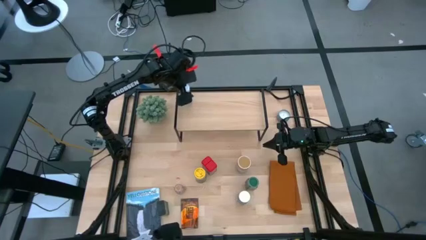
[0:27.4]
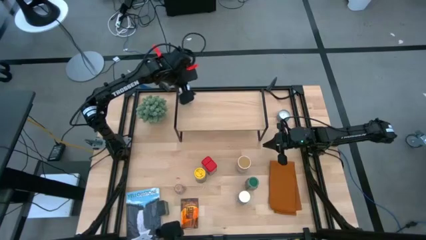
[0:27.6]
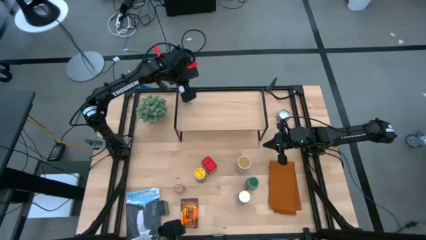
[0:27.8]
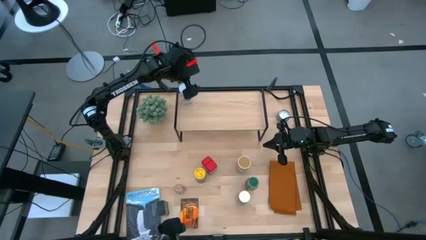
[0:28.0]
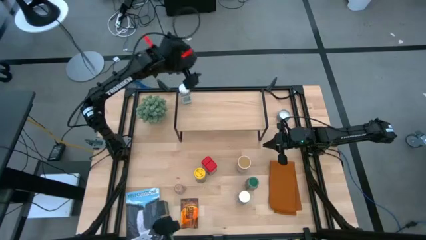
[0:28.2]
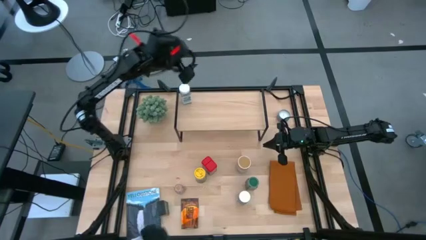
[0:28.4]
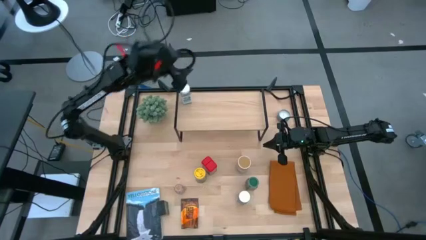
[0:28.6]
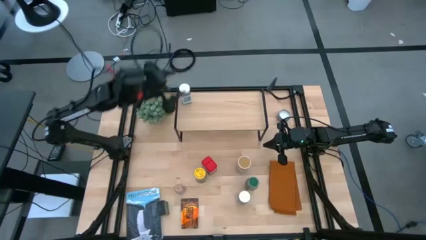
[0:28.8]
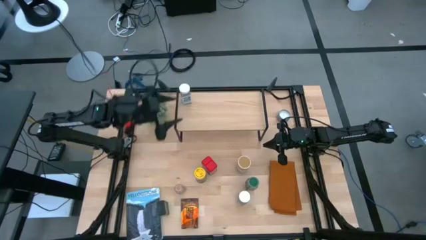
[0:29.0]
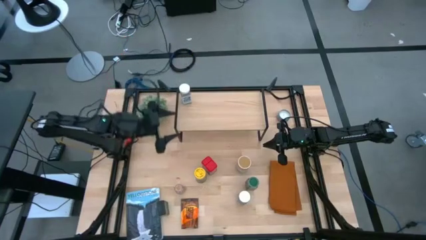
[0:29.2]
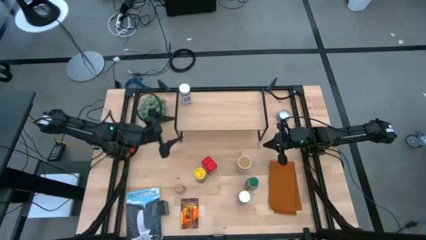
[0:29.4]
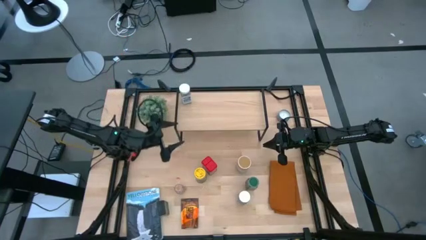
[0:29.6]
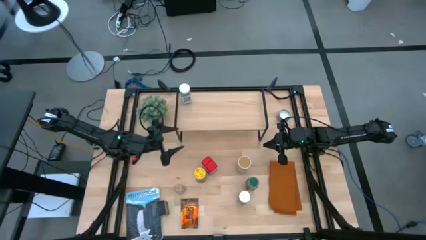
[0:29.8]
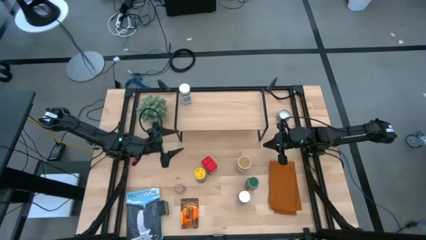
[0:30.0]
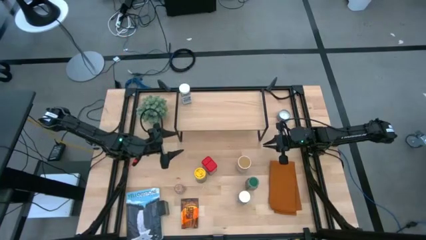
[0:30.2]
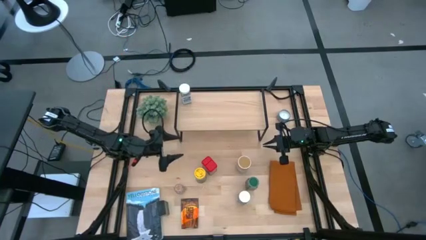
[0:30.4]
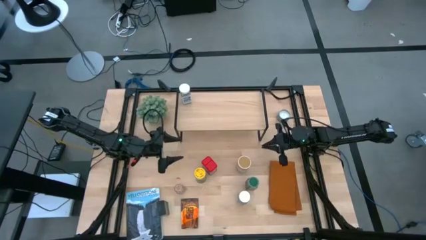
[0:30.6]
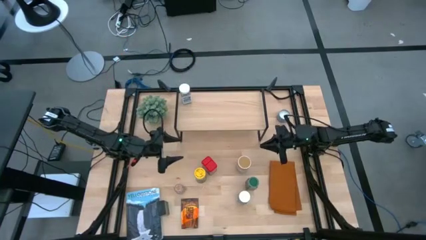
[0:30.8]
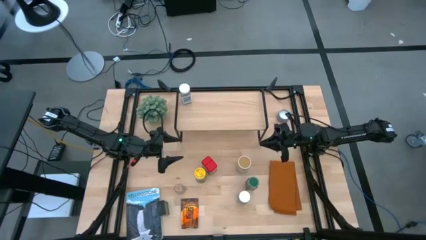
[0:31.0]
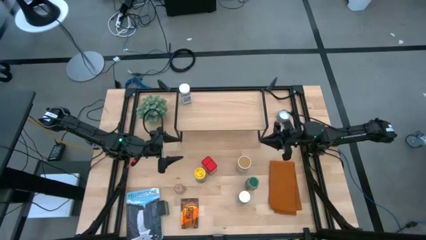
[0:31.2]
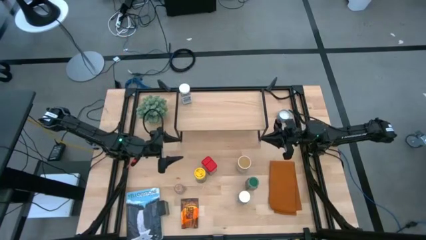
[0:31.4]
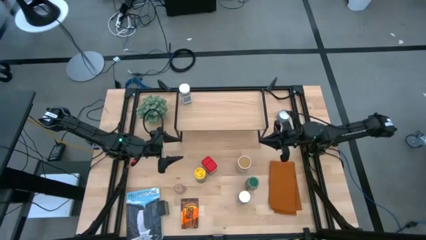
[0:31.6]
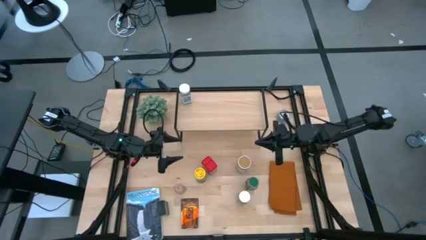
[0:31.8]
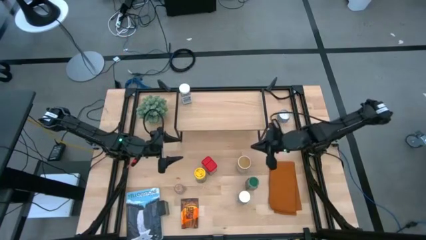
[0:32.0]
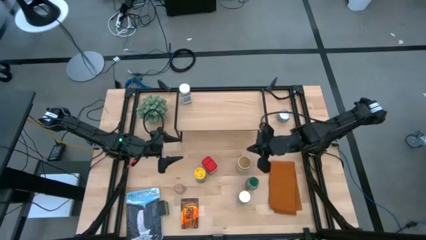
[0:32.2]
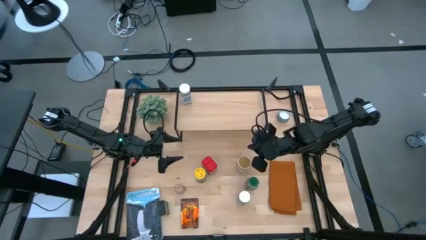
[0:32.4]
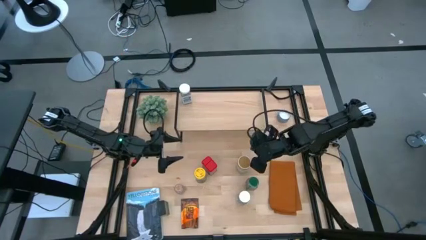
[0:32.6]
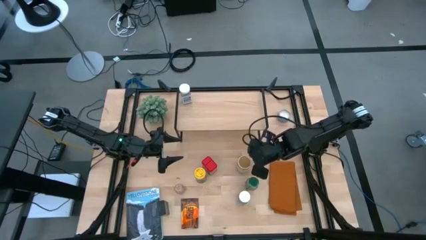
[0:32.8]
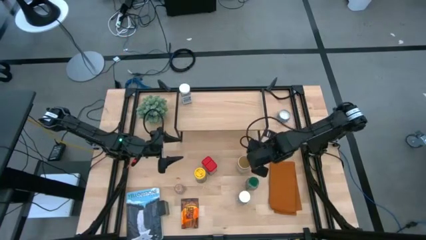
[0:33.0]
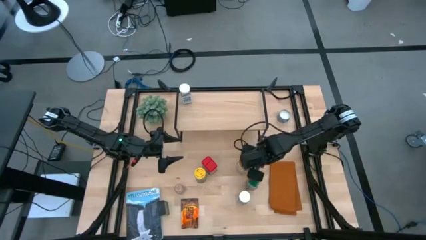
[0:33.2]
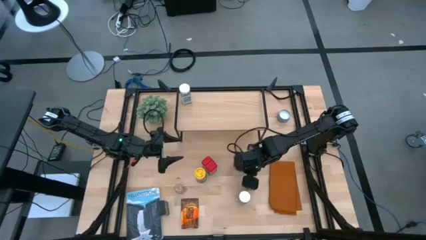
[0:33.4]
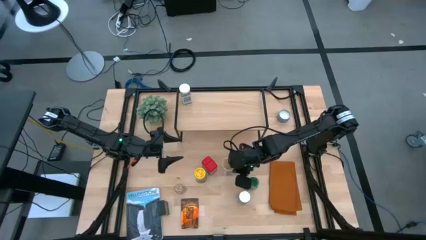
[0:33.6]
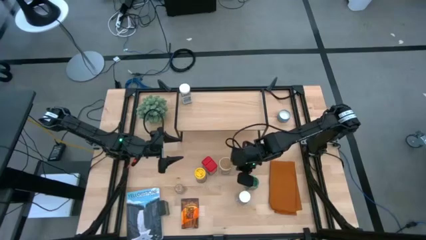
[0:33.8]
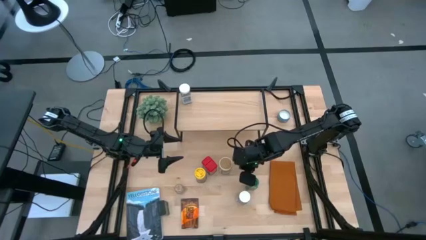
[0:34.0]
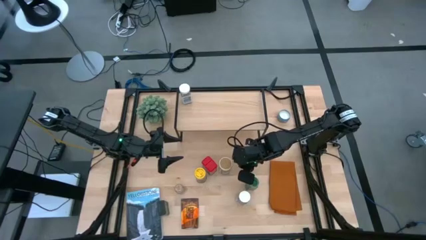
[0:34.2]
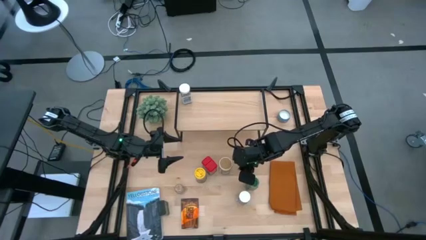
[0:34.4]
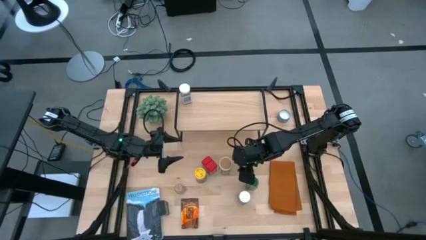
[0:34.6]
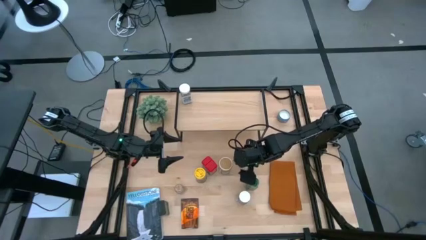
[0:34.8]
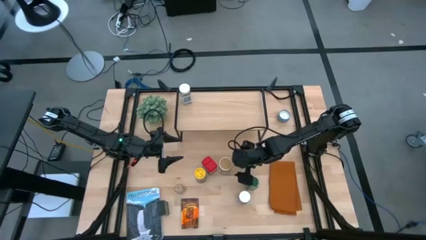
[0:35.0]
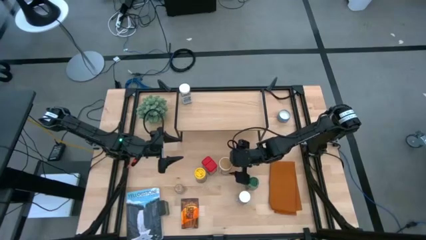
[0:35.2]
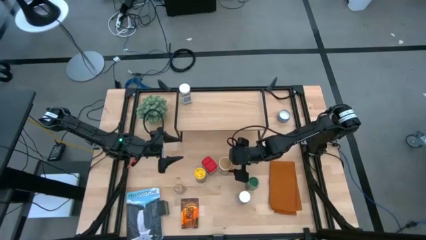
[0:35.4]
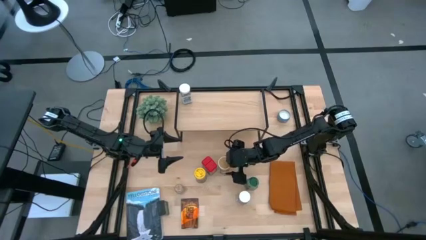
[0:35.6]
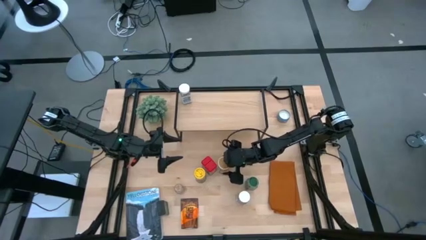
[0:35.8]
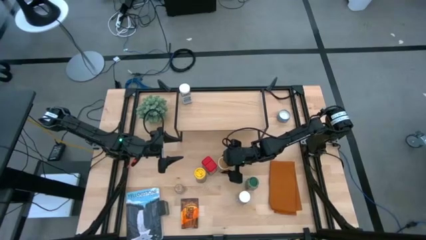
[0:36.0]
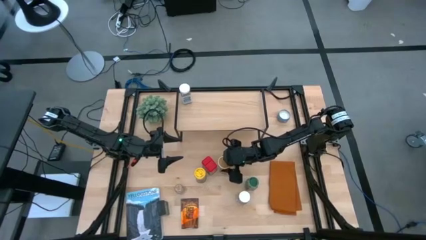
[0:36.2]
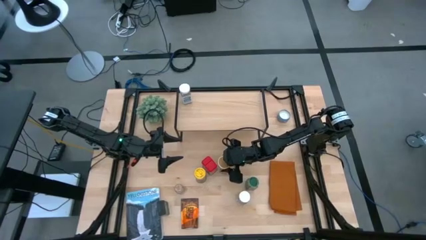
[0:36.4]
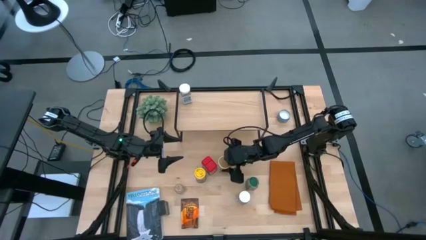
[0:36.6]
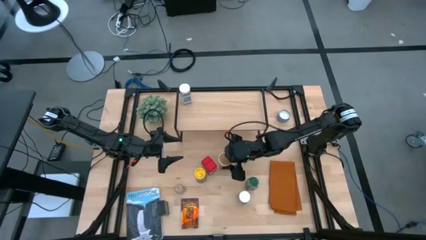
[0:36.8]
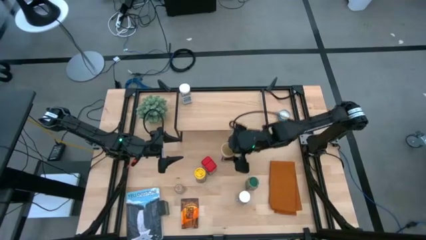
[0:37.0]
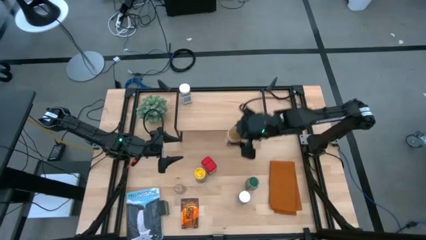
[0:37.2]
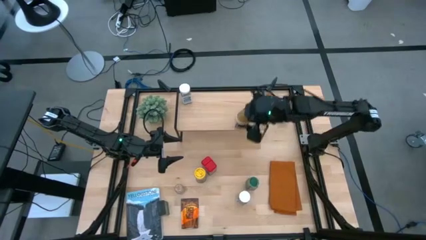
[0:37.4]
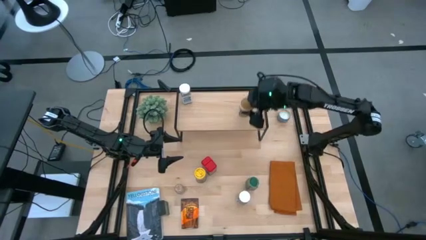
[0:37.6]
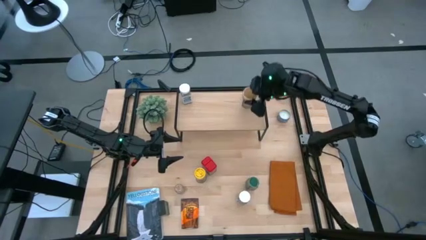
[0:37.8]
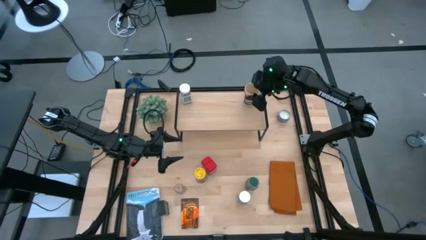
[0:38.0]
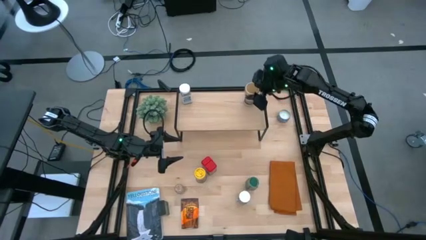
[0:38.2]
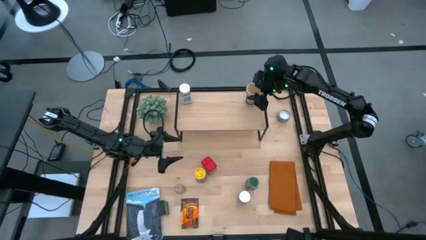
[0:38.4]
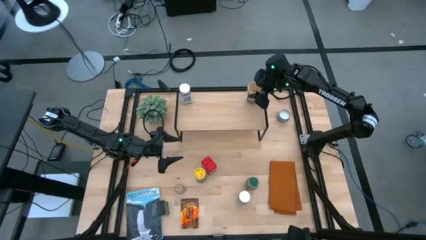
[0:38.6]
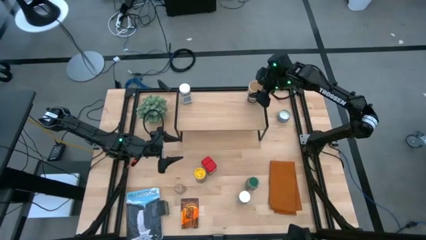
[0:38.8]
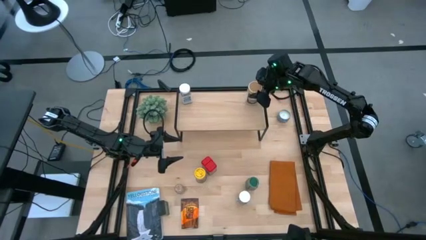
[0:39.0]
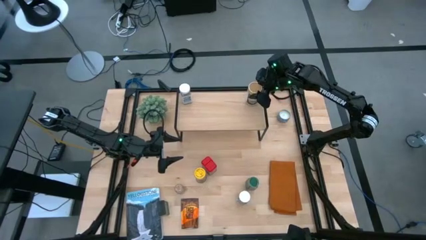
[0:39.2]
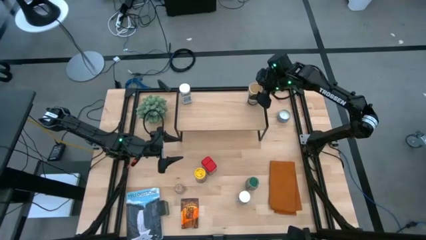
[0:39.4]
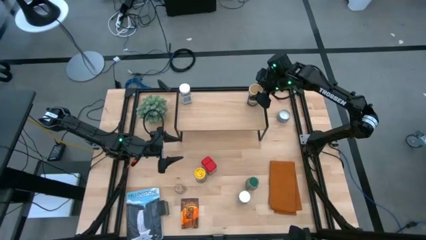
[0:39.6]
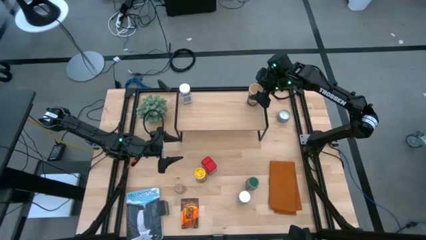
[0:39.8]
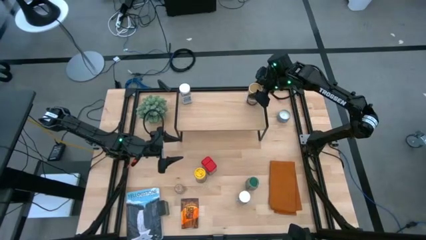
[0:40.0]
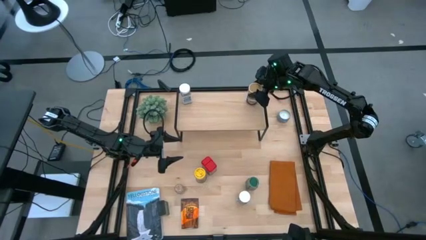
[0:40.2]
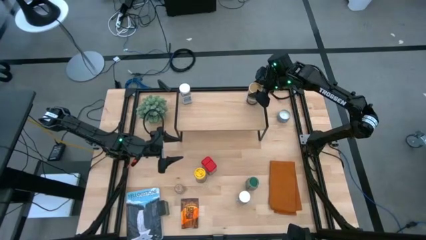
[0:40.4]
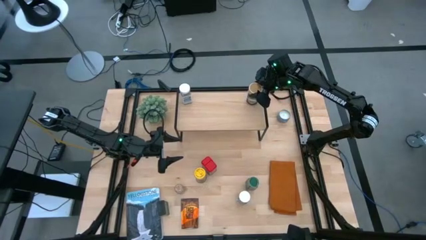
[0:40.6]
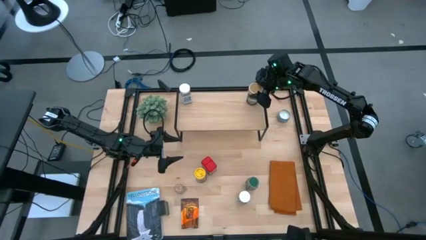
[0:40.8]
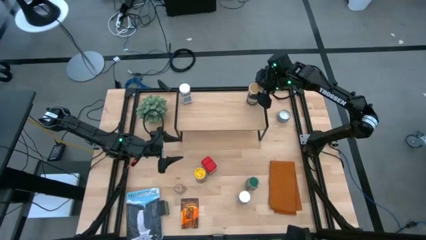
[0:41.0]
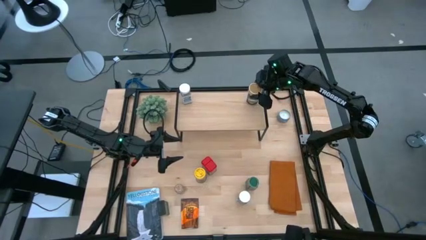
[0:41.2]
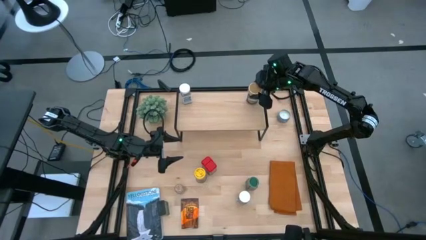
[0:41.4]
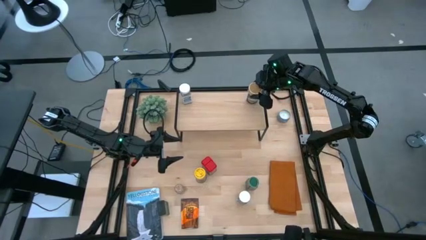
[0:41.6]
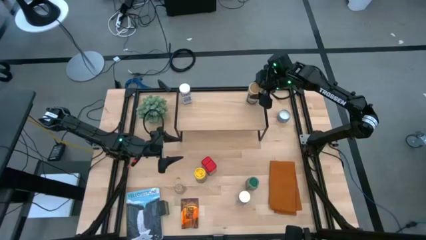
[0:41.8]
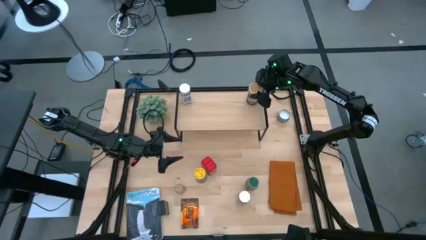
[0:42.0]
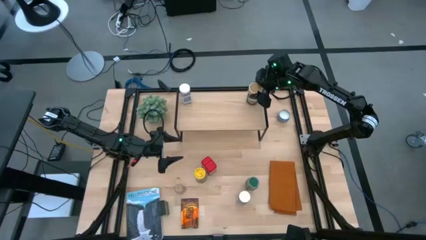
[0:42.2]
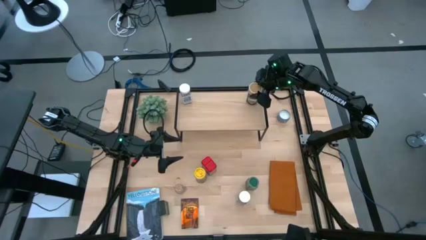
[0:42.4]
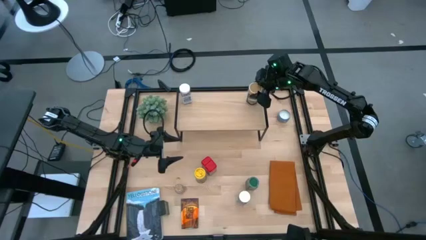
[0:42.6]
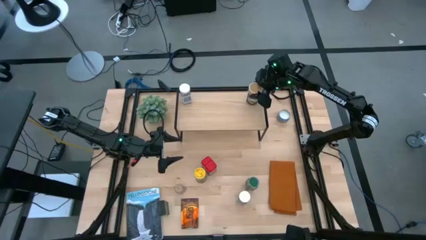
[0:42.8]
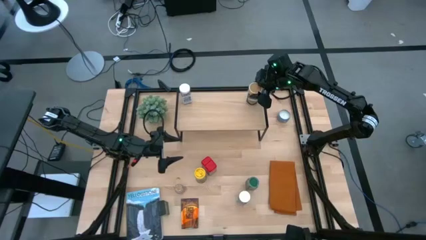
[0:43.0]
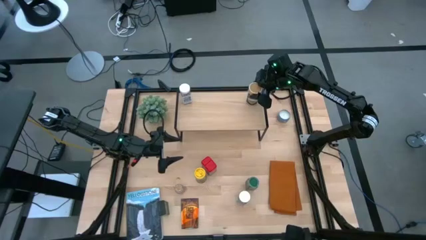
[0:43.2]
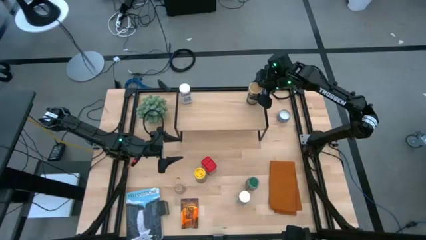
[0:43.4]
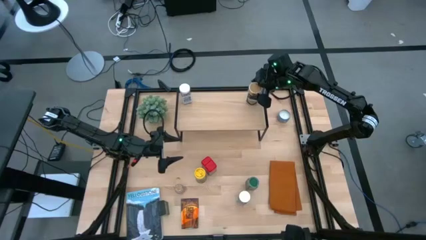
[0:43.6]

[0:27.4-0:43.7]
Task: Shelf spices
Put the brown seasoning bottle onto the shelf
